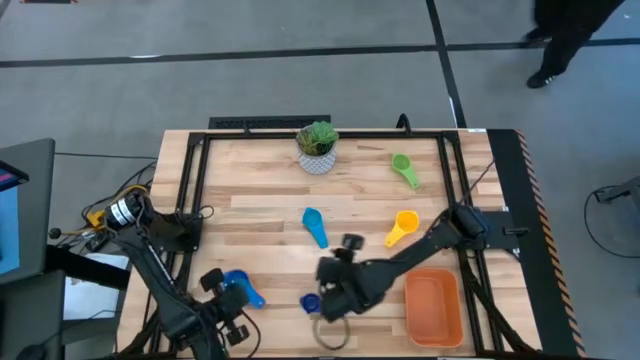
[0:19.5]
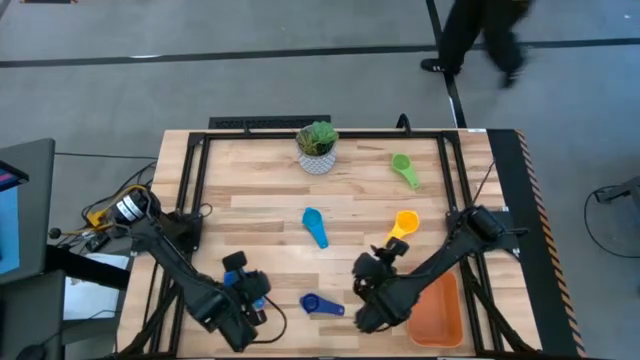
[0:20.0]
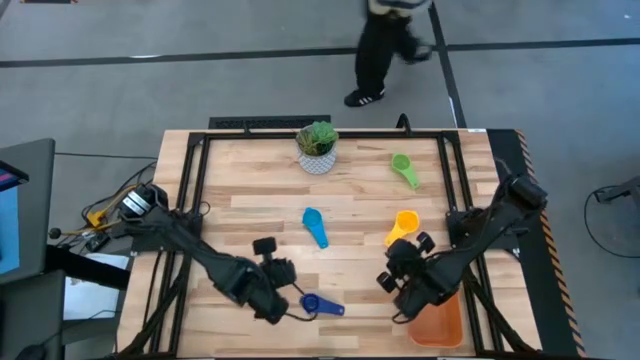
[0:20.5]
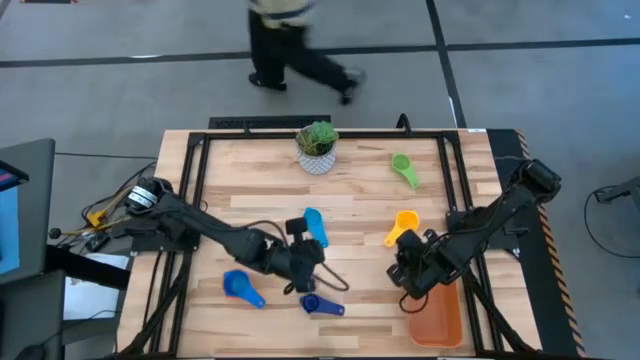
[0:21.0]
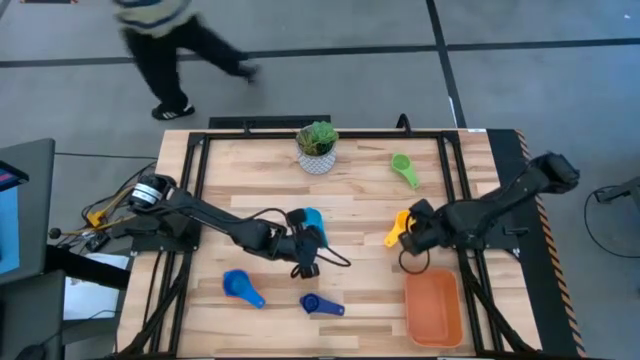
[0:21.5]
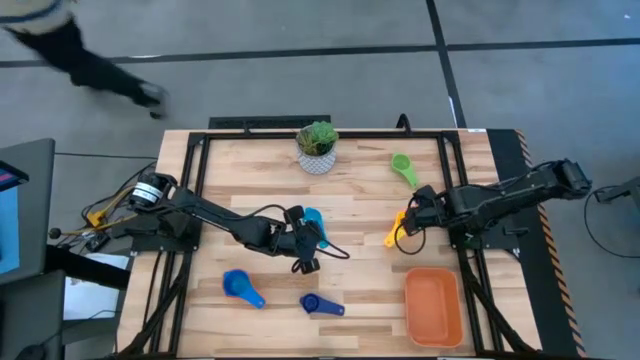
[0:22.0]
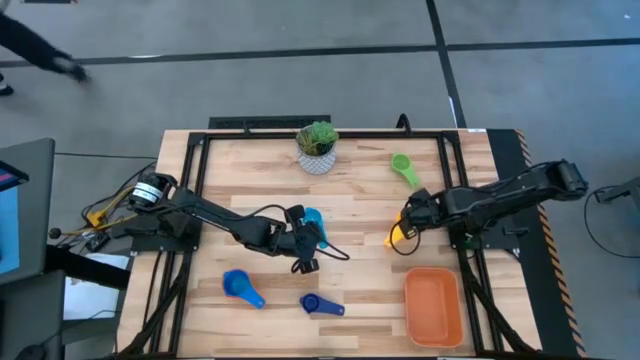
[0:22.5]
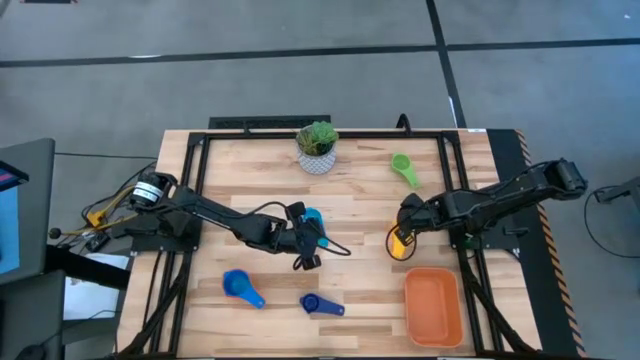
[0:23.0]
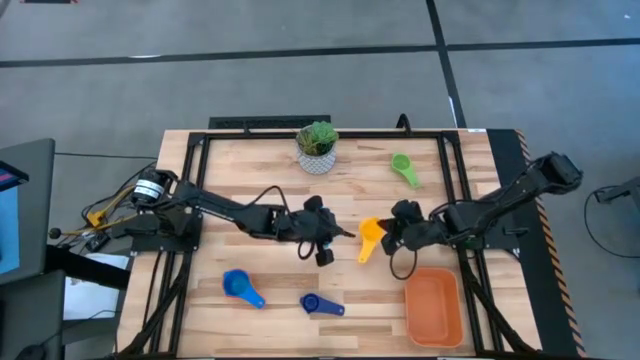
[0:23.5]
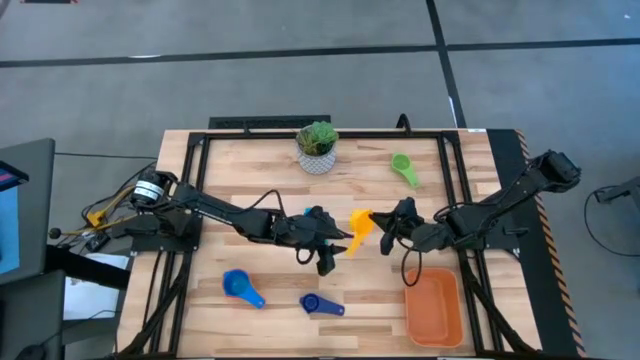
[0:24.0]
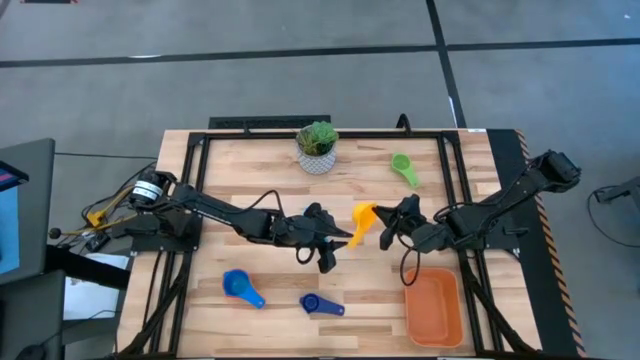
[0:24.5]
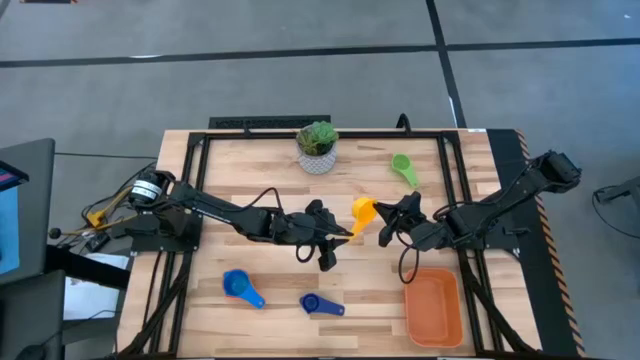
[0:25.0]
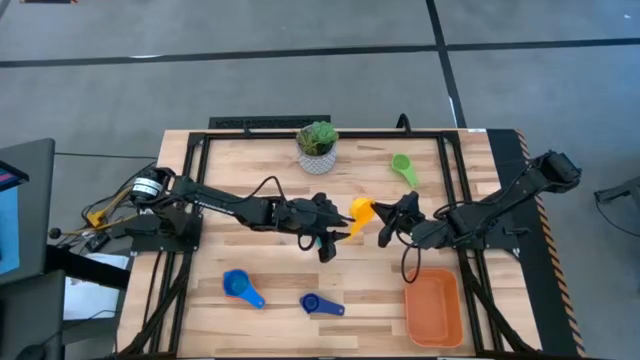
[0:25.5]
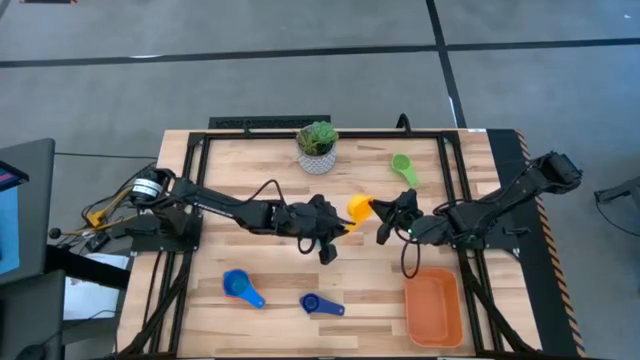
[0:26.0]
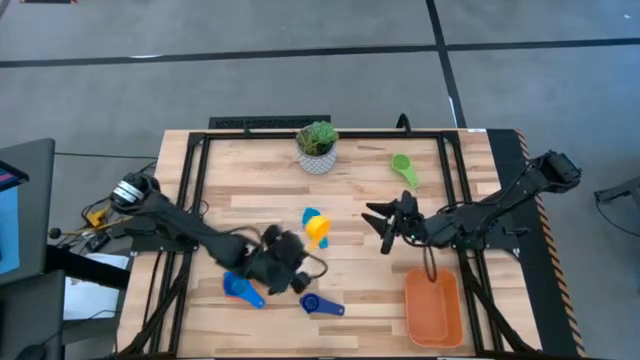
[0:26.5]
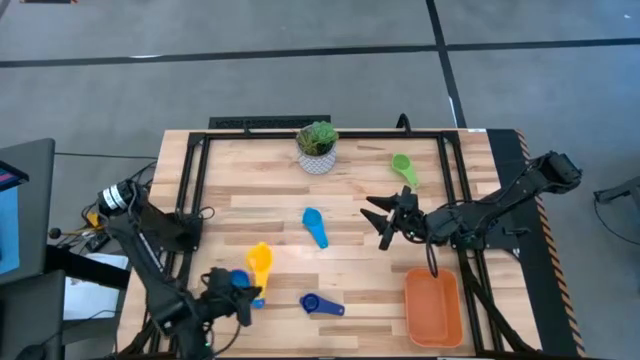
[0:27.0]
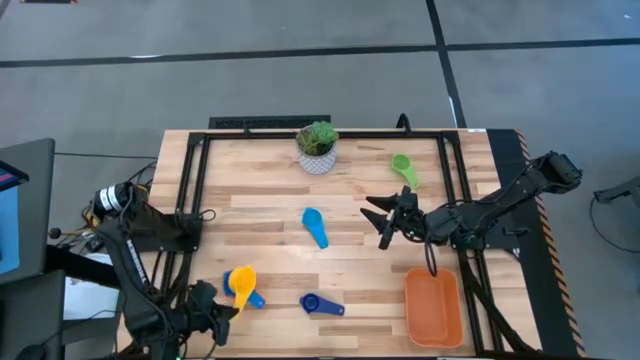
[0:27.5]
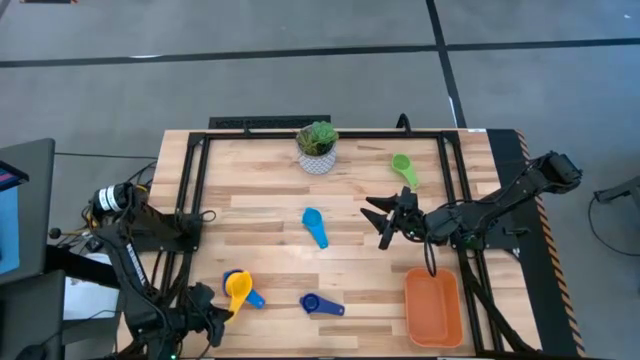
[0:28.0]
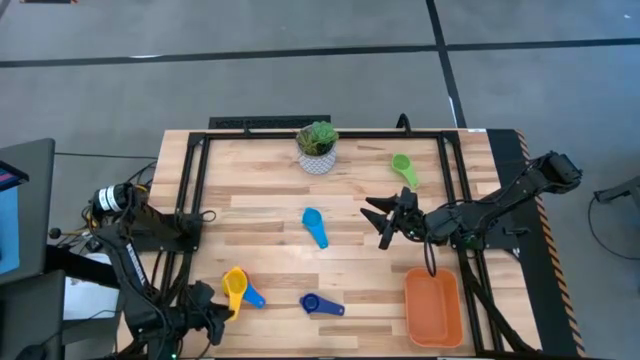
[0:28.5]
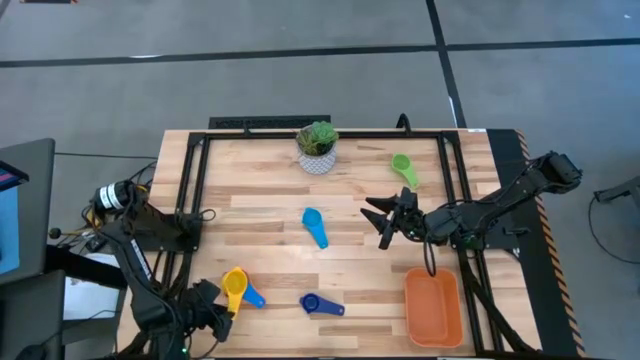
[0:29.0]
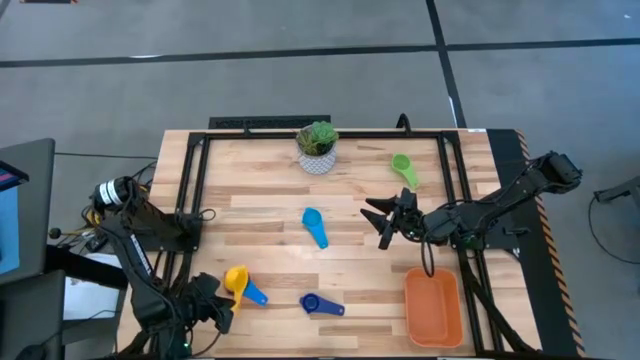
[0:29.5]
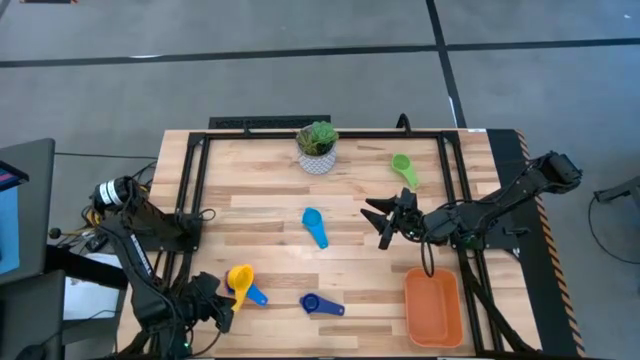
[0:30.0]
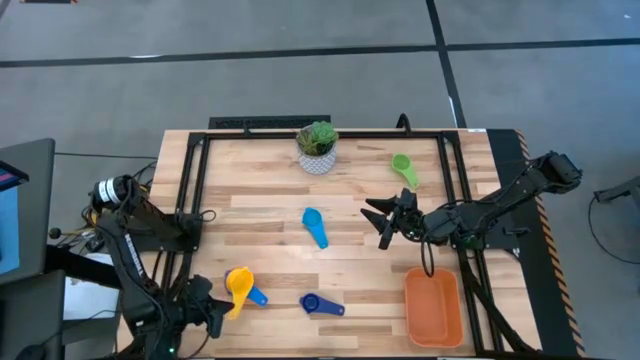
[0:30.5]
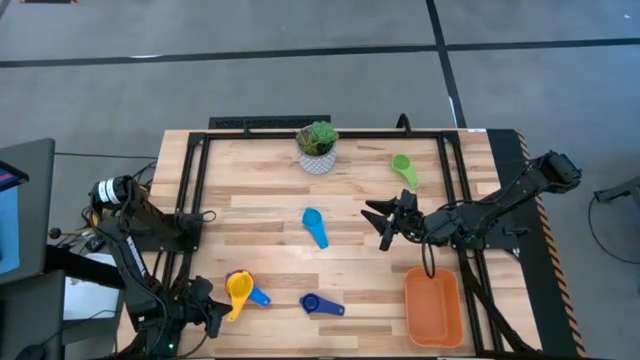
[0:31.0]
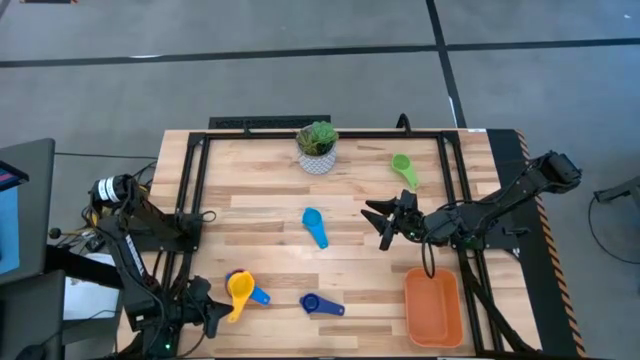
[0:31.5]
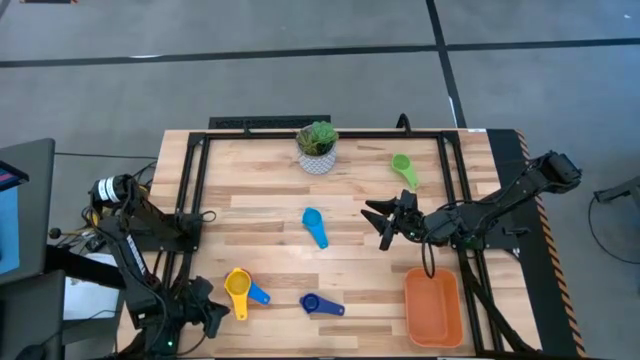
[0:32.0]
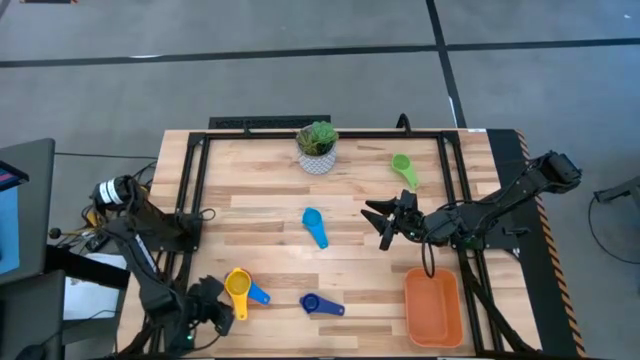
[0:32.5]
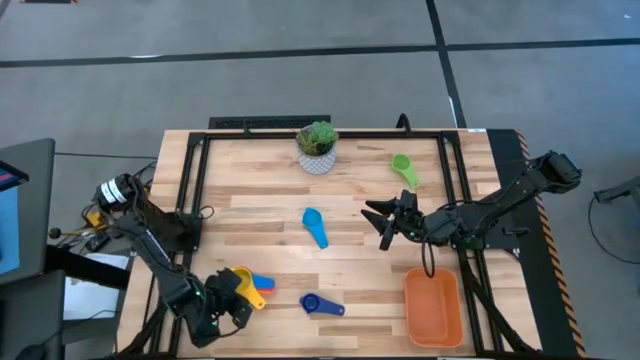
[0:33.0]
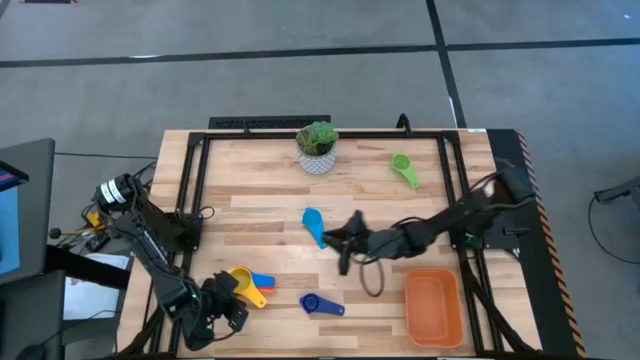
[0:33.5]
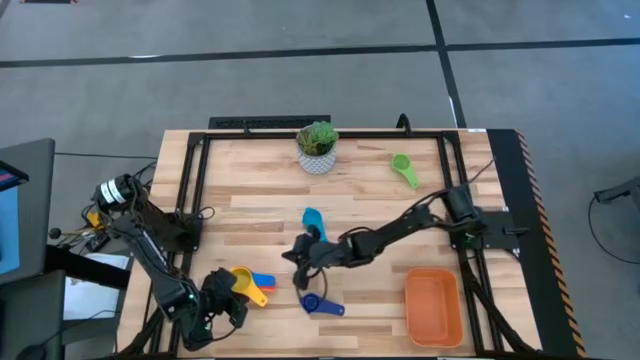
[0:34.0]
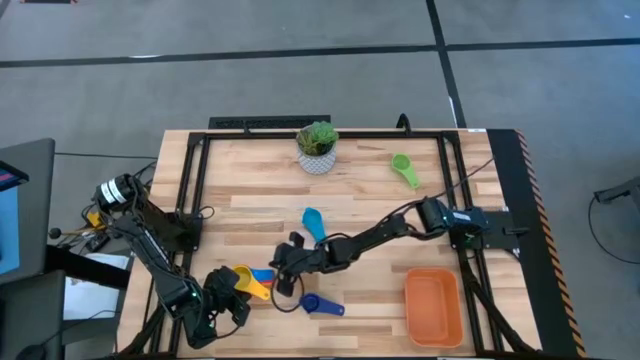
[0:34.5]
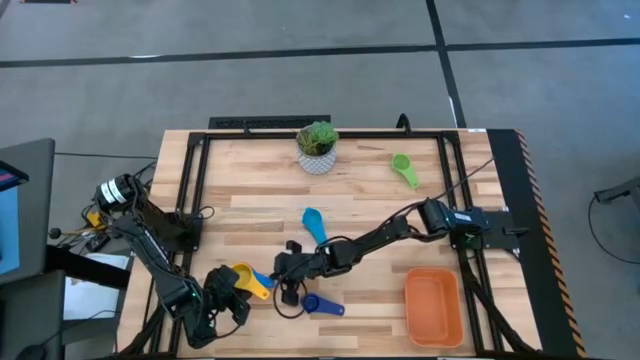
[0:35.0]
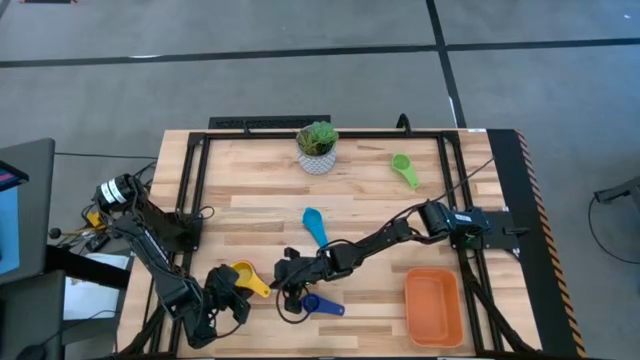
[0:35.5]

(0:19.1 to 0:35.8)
Task: Nest measuring cups in basket
Stack the yellow measuring cup on top of the blue measuring cup

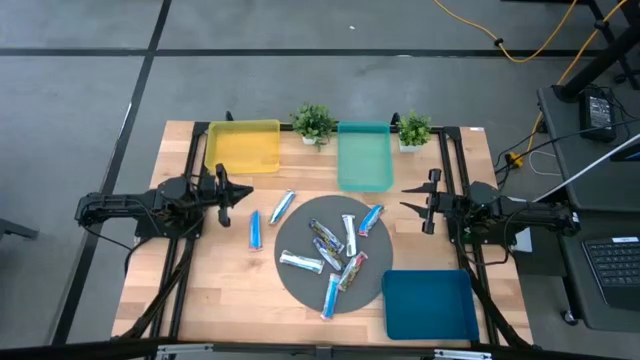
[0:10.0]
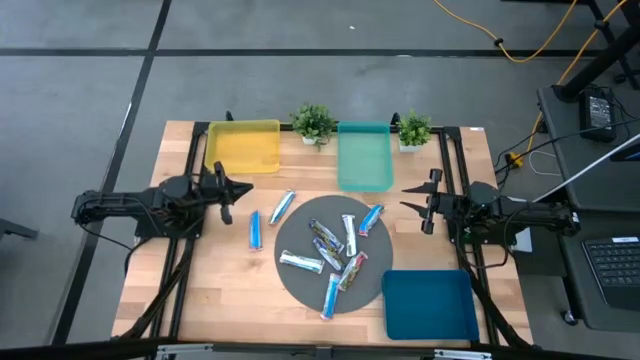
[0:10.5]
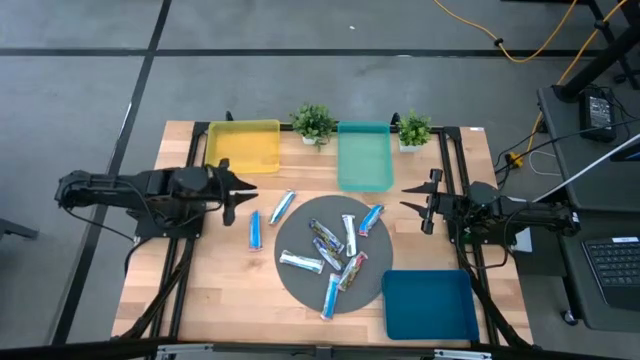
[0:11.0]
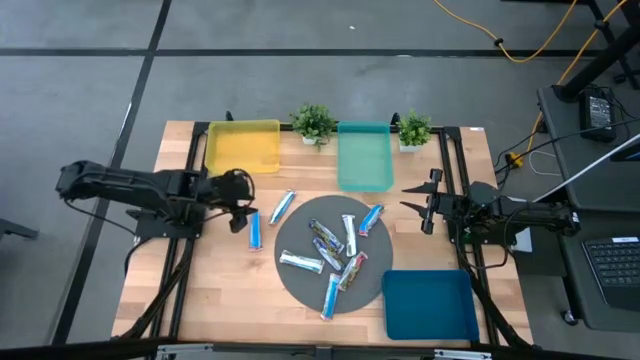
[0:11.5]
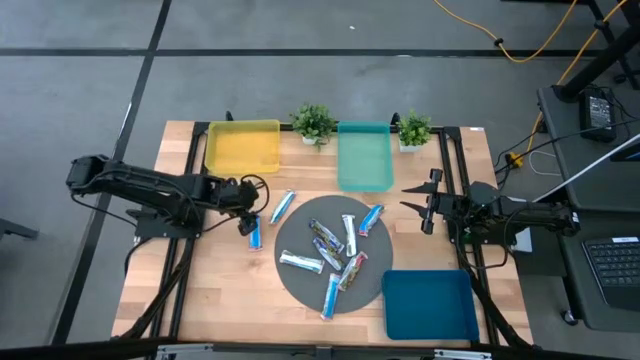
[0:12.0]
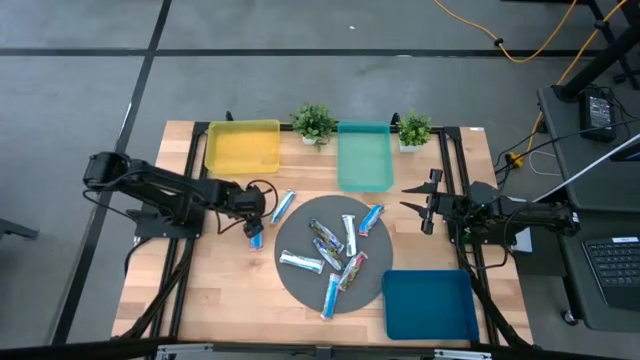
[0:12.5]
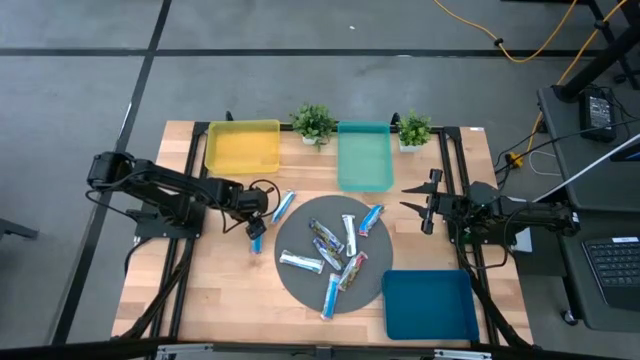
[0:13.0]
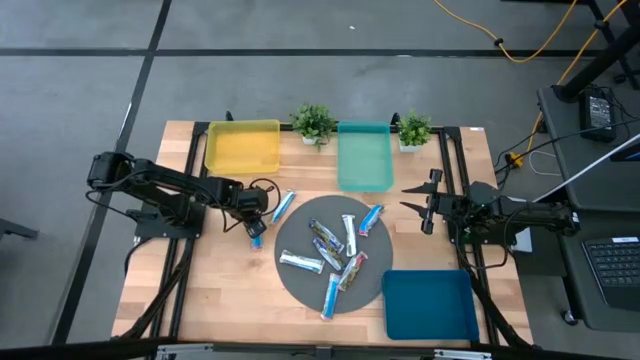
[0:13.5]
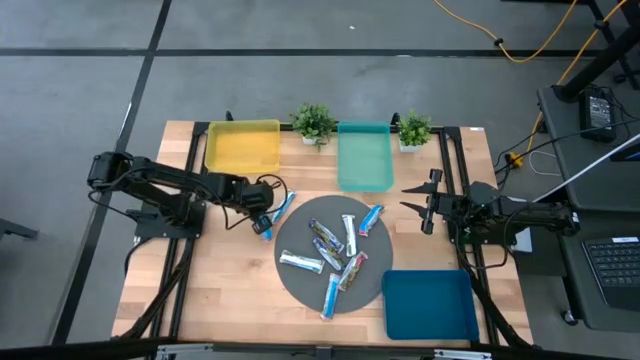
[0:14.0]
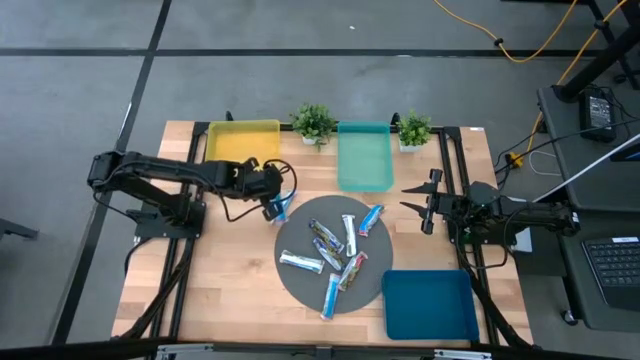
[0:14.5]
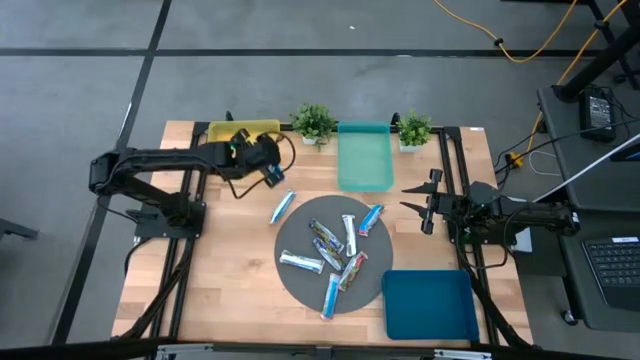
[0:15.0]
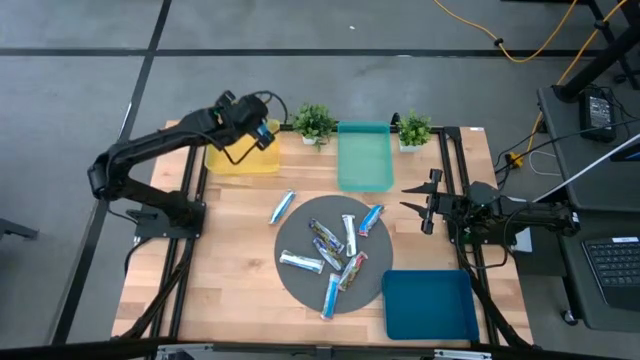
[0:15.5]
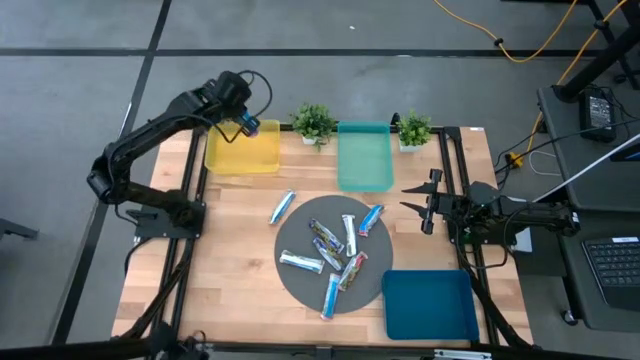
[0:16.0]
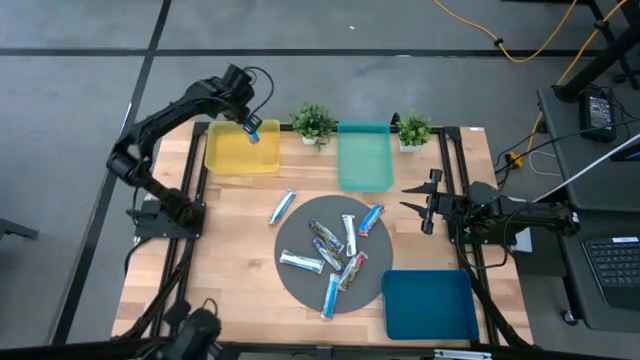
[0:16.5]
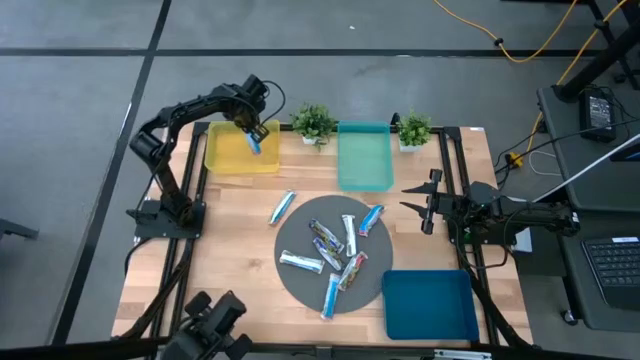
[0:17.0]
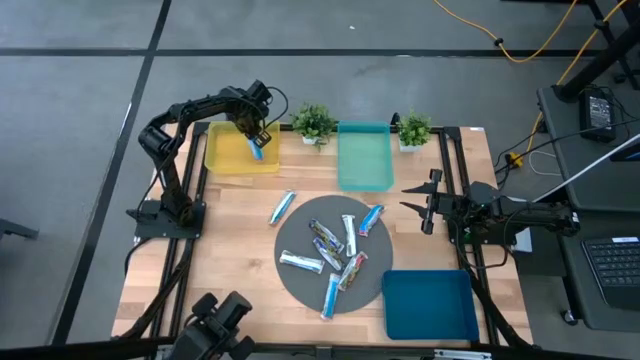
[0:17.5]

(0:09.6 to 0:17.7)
Task: Pick and place Granola Bars by type
Put the red granola bar into the yellow bin
